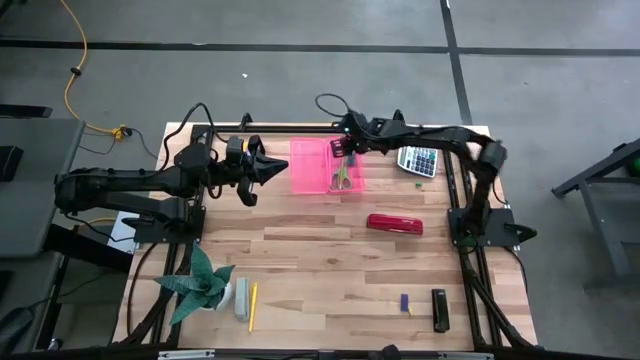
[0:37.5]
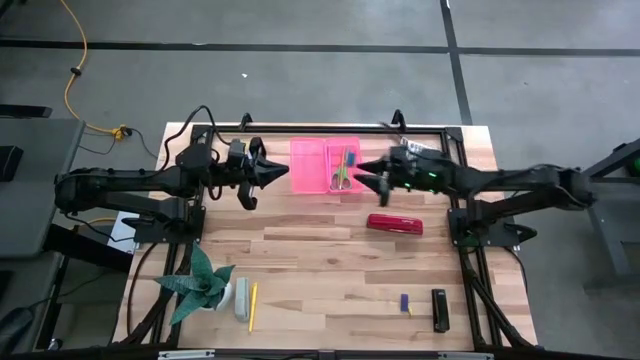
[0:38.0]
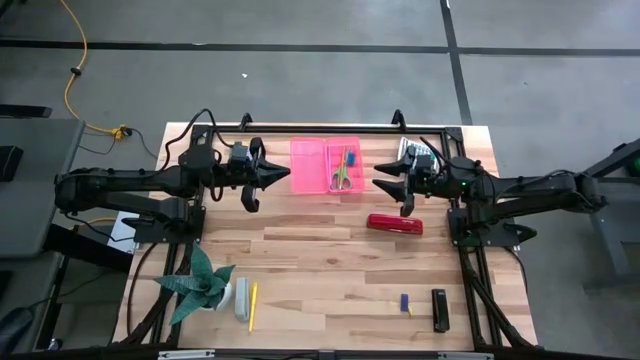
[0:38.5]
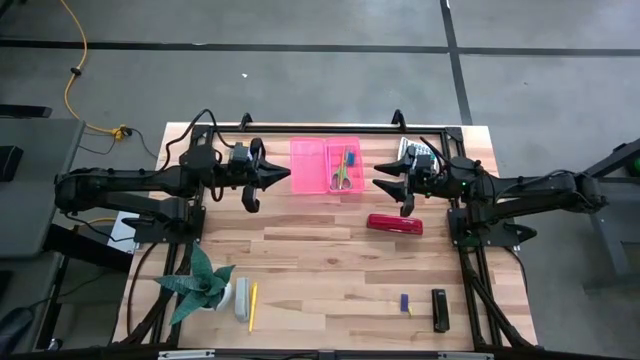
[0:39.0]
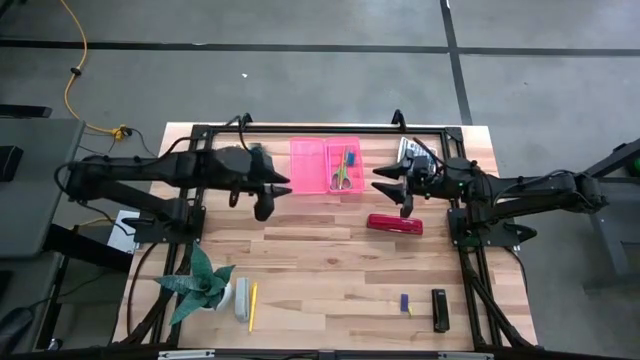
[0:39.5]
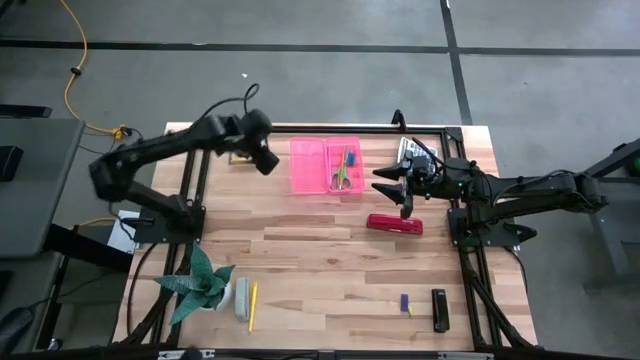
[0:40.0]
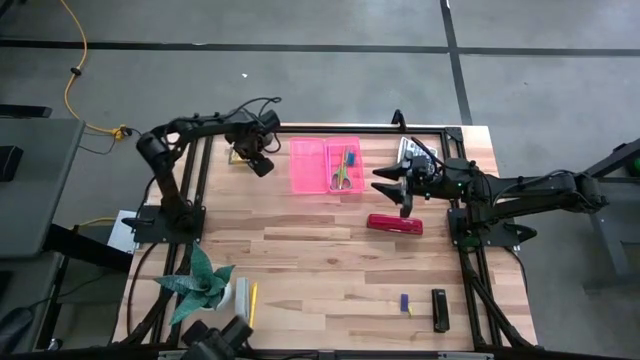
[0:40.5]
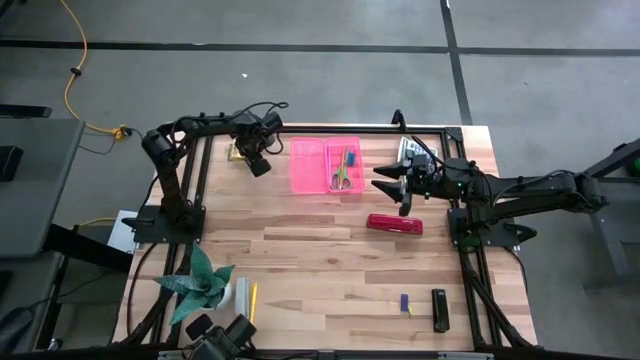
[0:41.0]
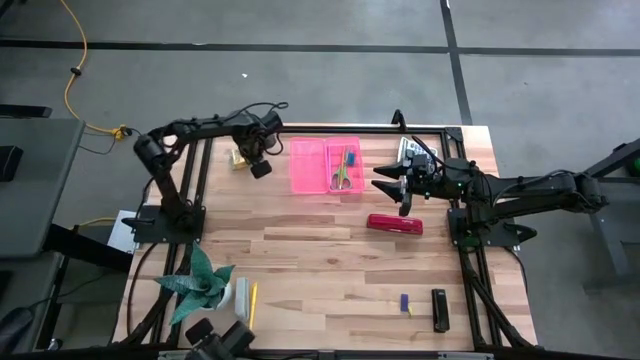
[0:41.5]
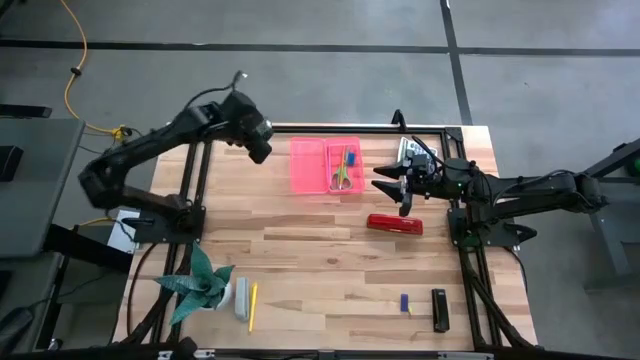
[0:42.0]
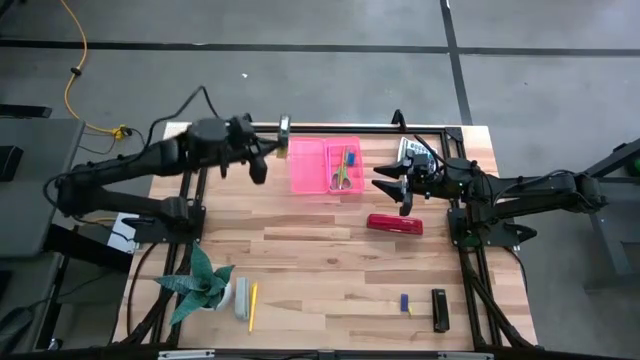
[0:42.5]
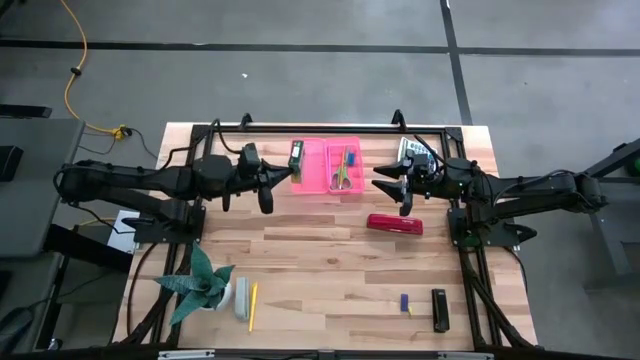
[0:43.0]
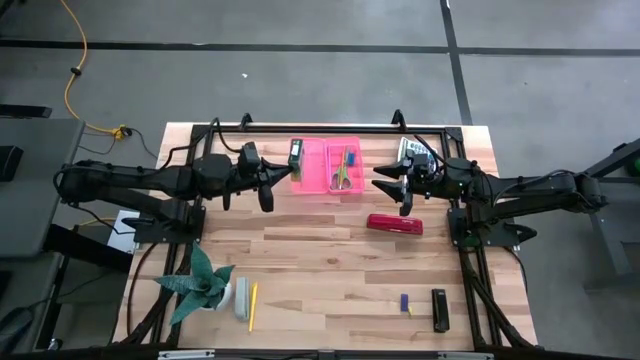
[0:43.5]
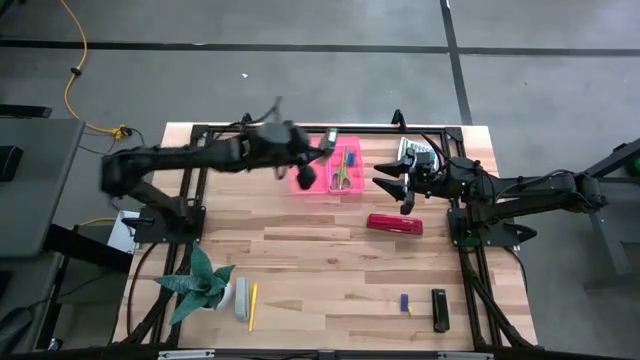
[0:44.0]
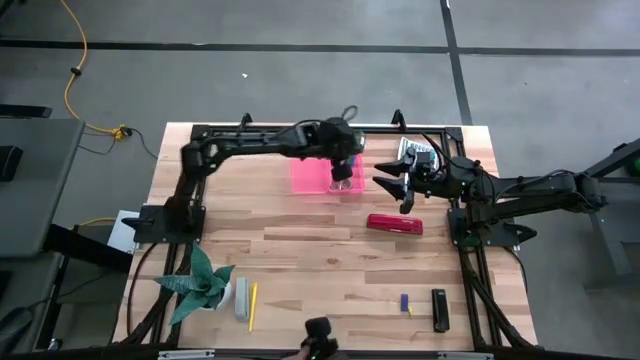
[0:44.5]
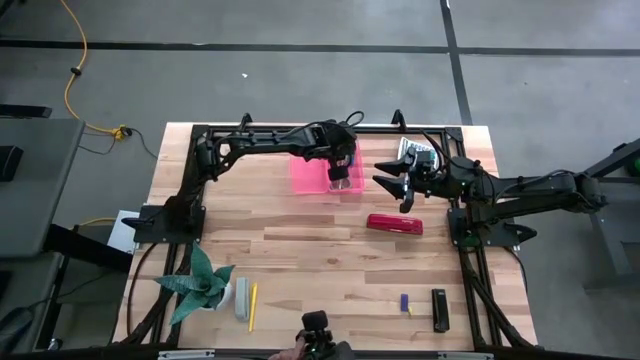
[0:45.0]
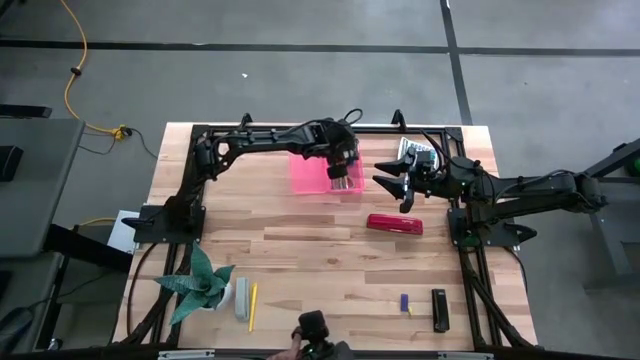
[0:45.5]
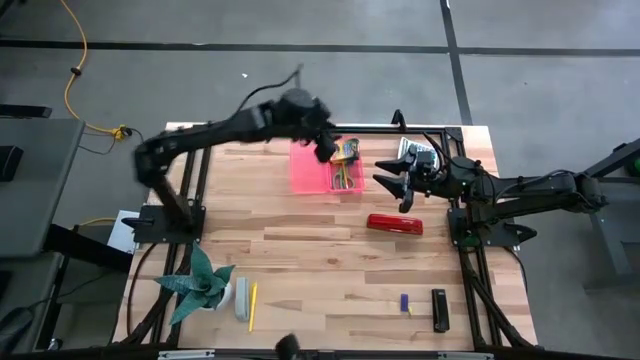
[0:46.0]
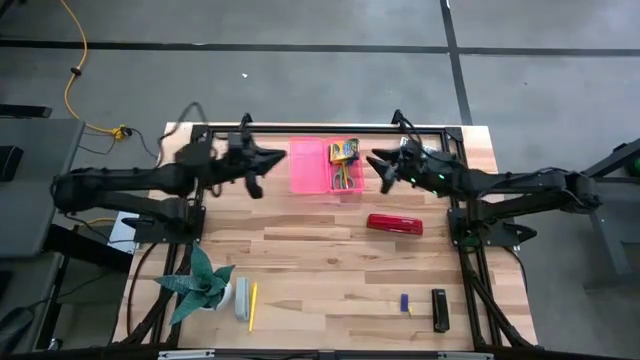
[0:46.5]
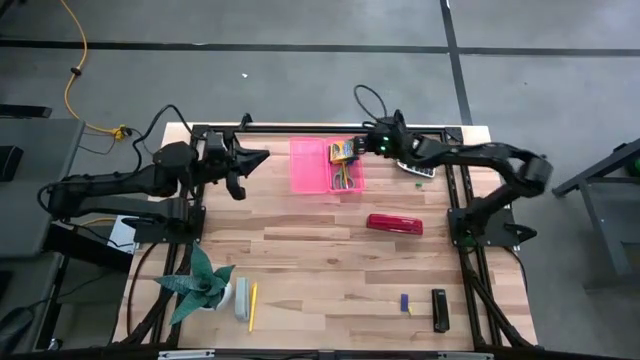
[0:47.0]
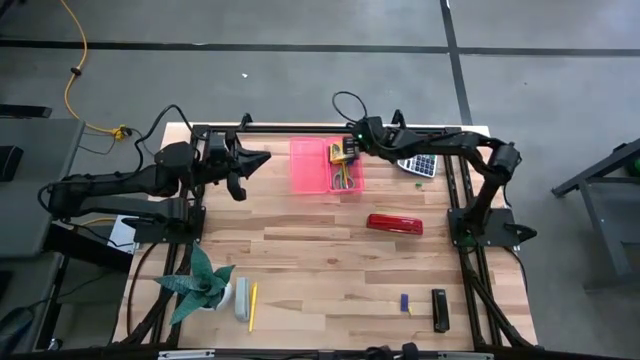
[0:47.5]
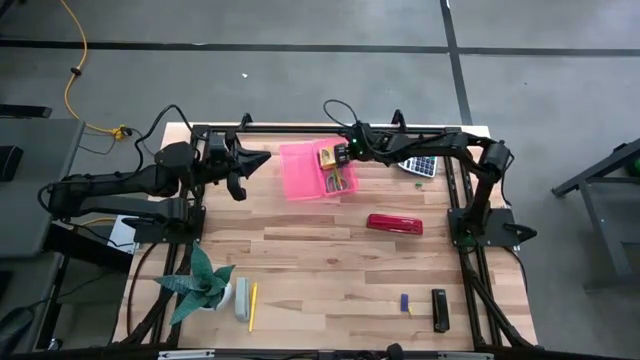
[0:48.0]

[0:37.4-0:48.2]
Task: Pack school essentials
Put the yellow crayon box into the pink supply box

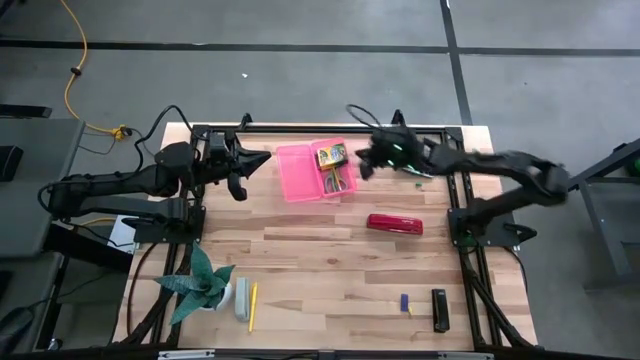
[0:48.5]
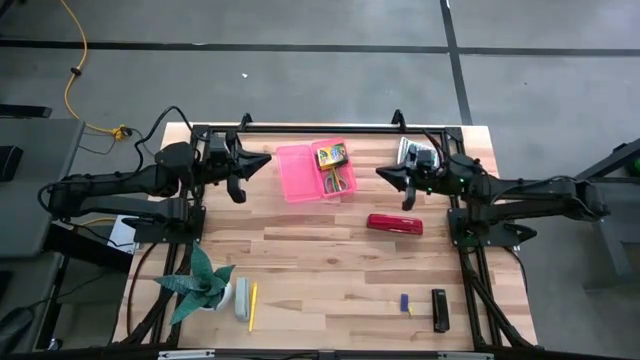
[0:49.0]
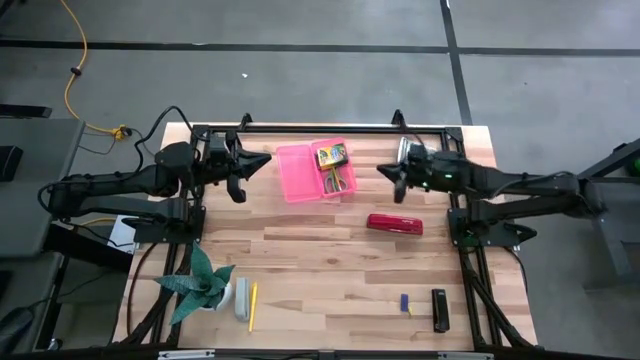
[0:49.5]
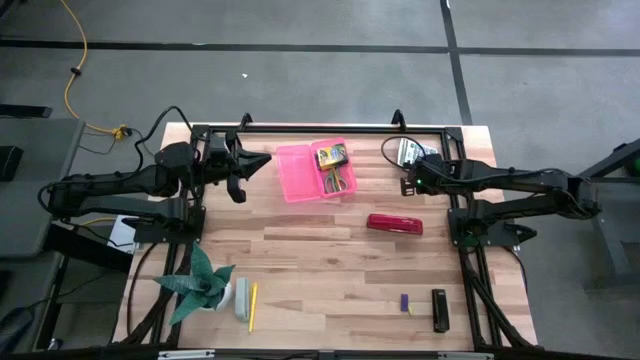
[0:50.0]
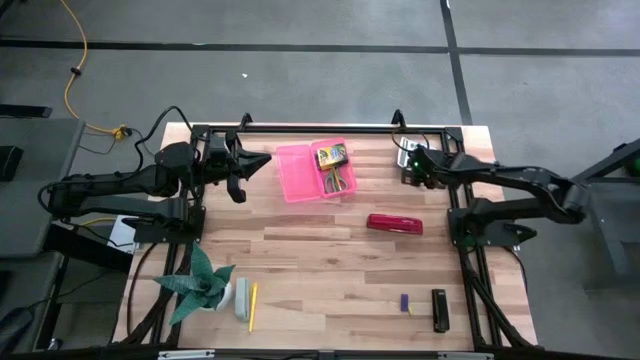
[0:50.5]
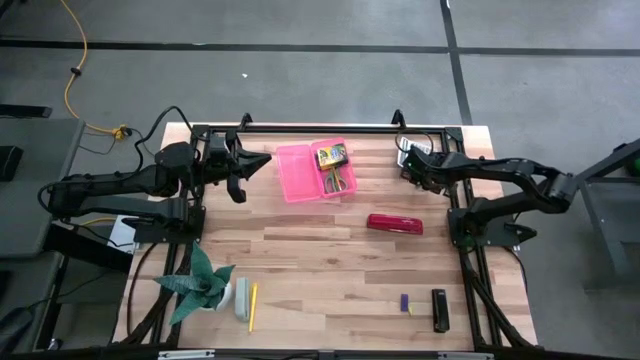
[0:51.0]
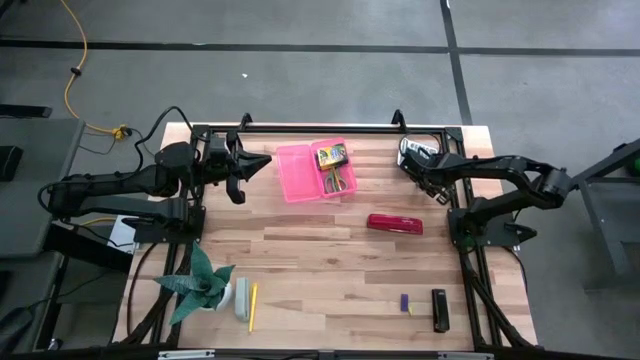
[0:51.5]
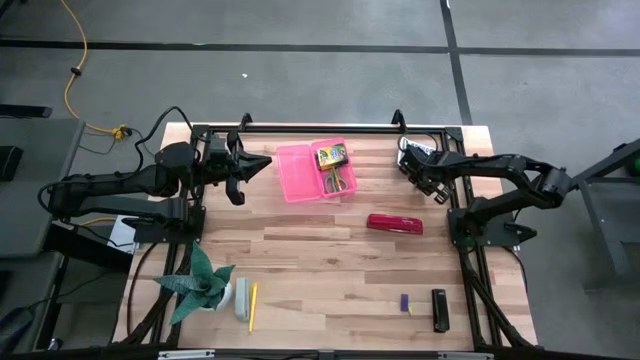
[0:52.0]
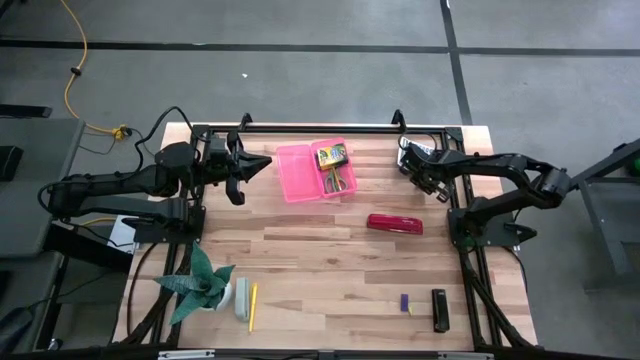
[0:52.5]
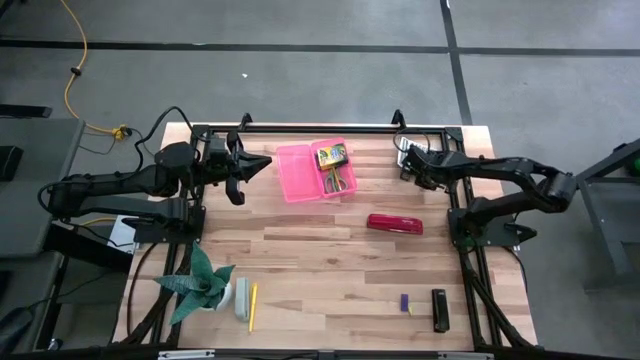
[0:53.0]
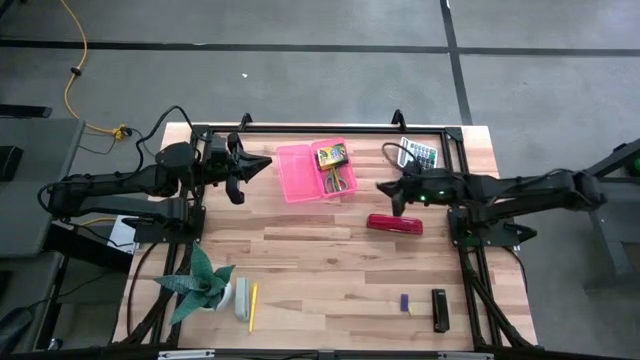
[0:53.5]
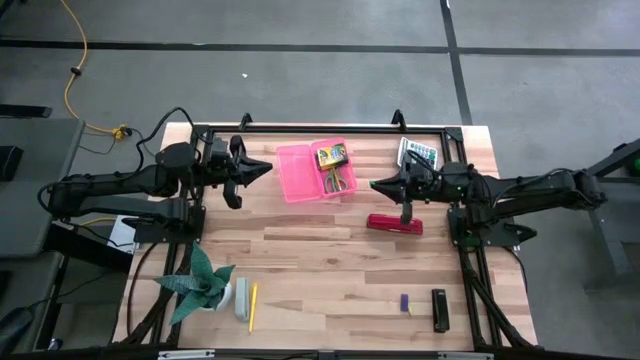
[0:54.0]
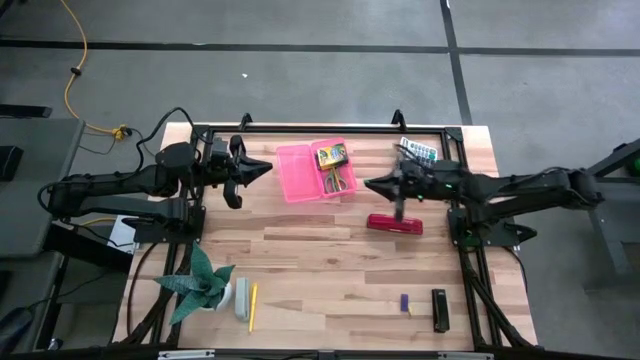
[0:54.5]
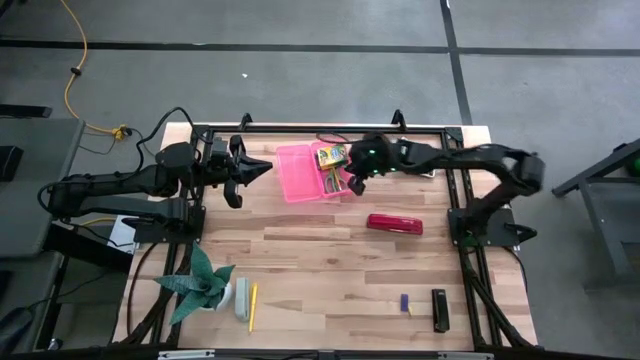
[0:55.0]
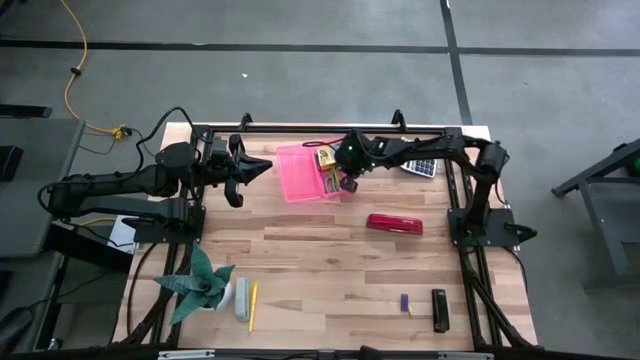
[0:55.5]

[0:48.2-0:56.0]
Put the green eraser into the pink supply box

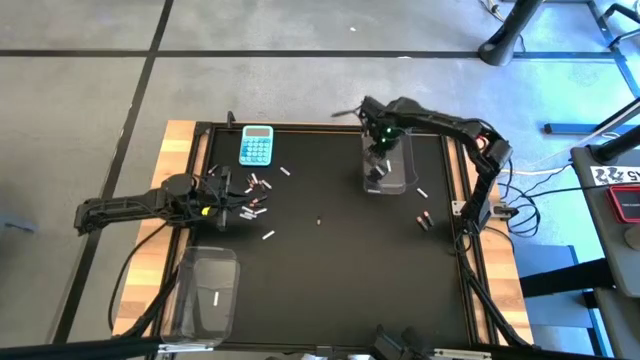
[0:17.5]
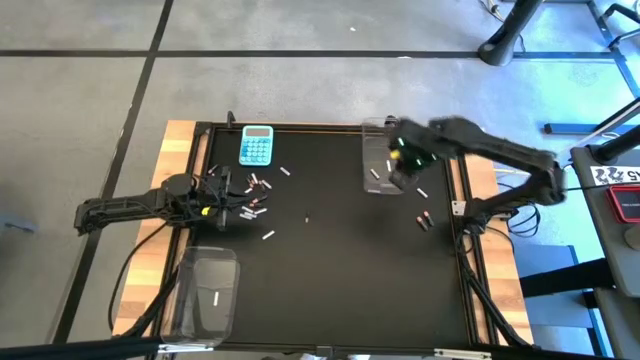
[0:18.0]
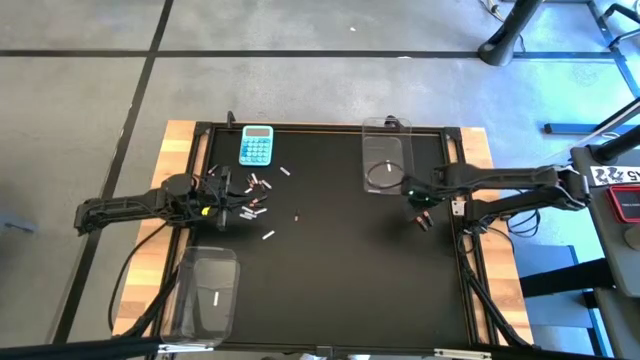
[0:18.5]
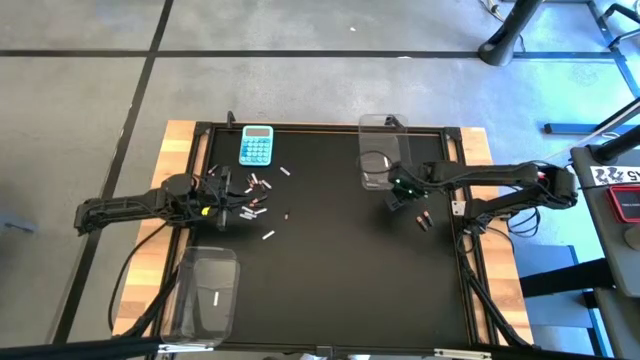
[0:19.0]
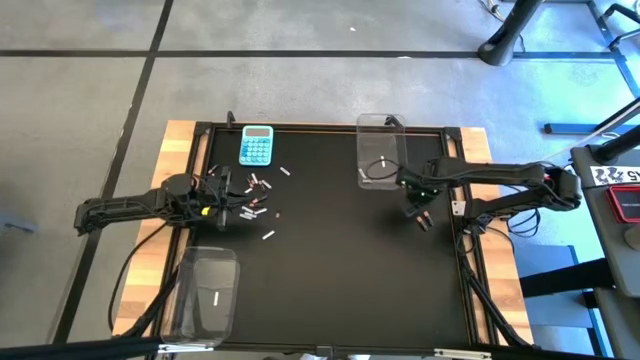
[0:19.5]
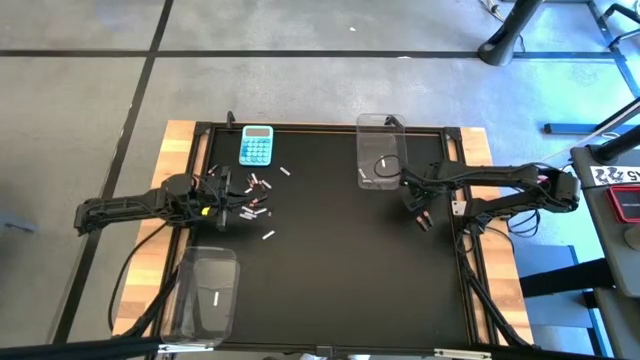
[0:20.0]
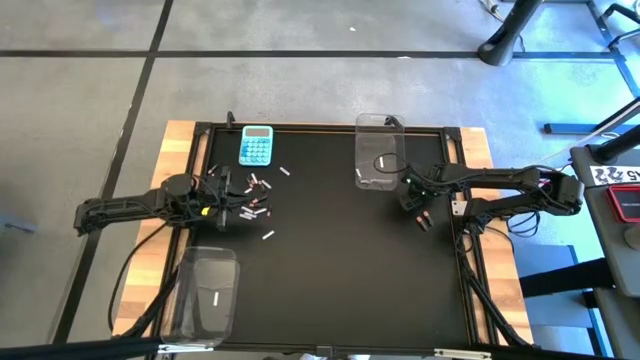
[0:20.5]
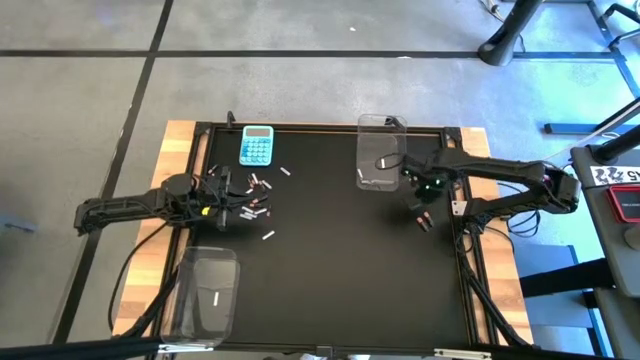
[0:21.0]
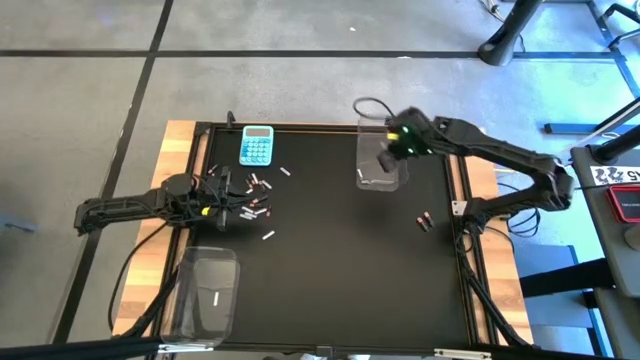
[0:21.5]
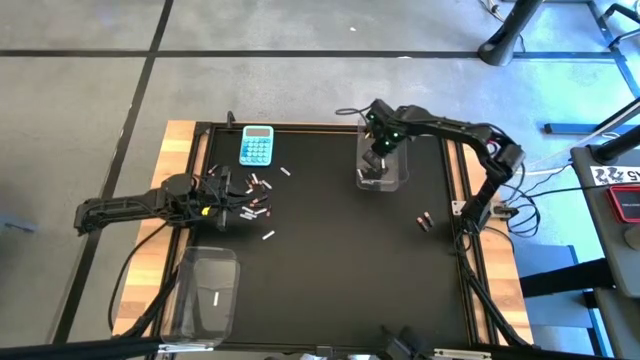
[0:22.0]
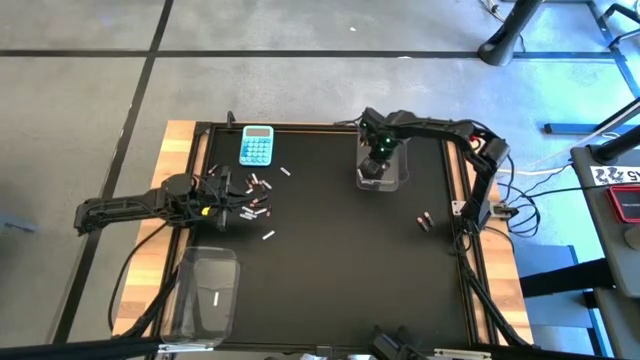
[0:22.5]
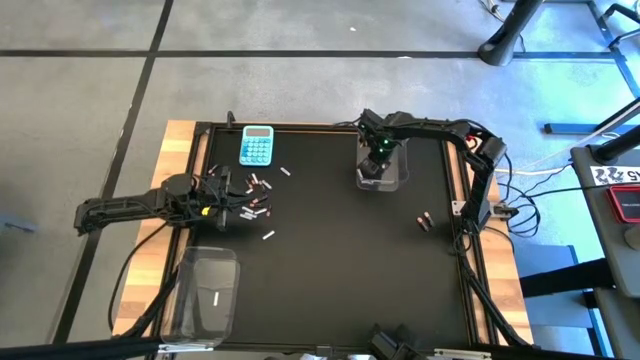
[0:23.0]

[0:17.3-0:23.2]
Task: Sort batteries
Put the white battery into the top transparent bin
